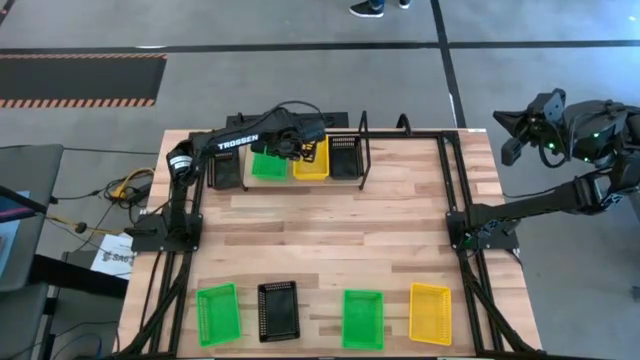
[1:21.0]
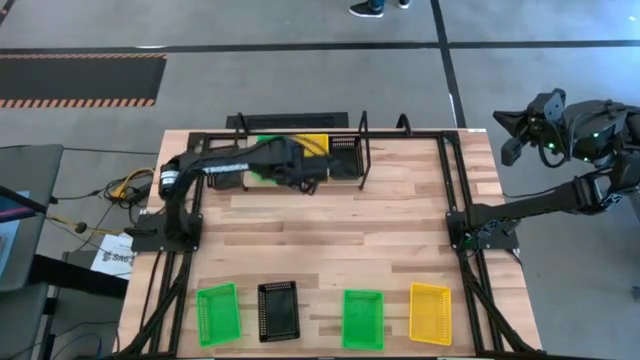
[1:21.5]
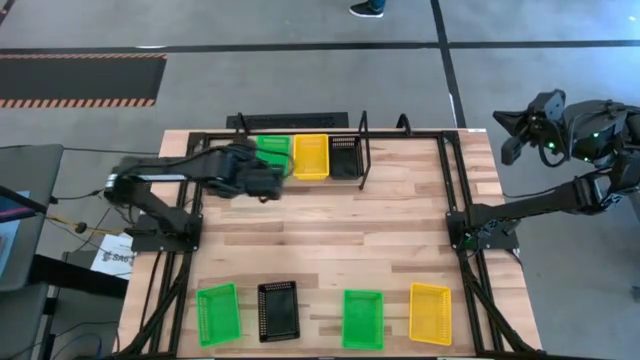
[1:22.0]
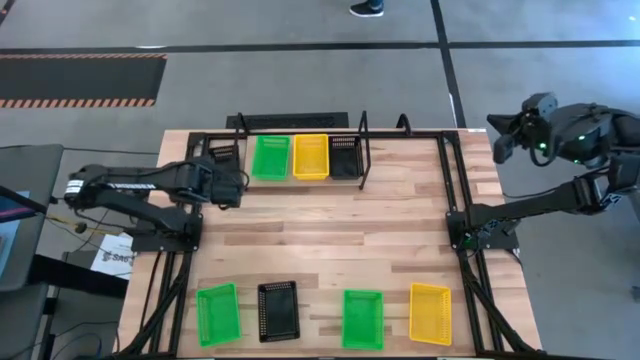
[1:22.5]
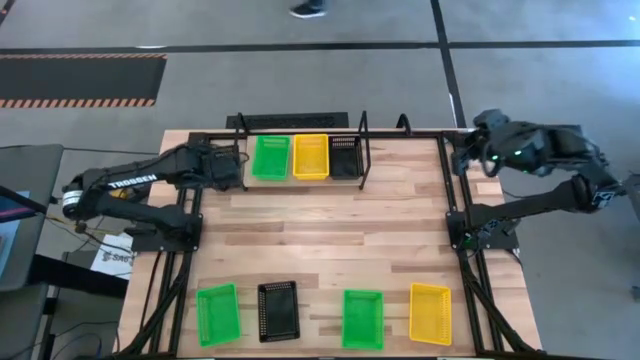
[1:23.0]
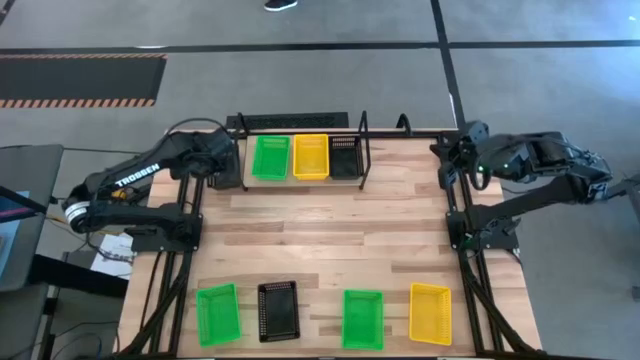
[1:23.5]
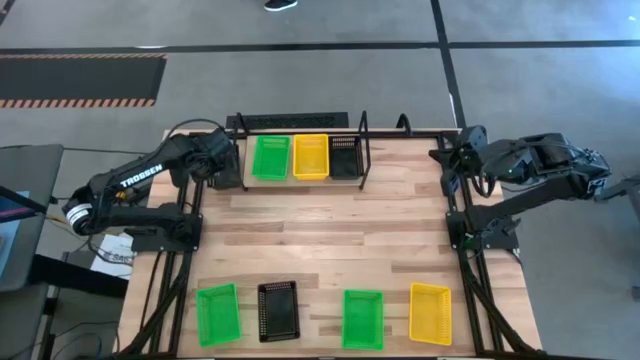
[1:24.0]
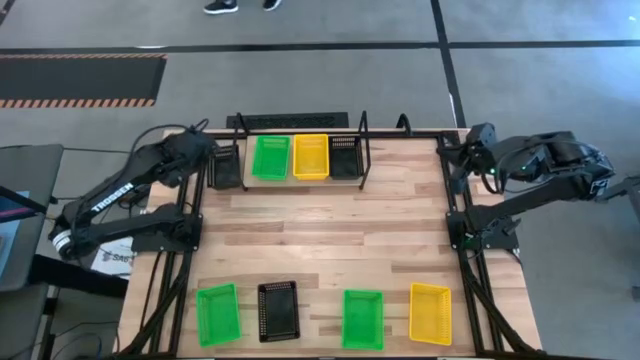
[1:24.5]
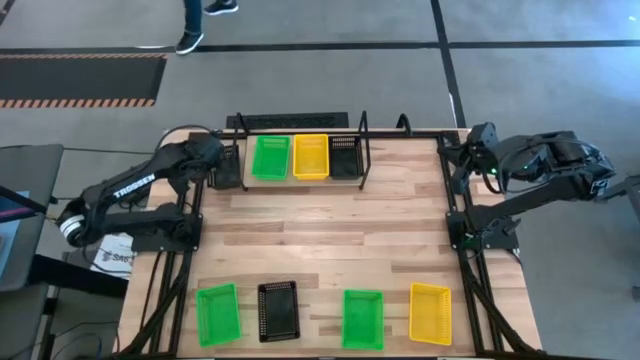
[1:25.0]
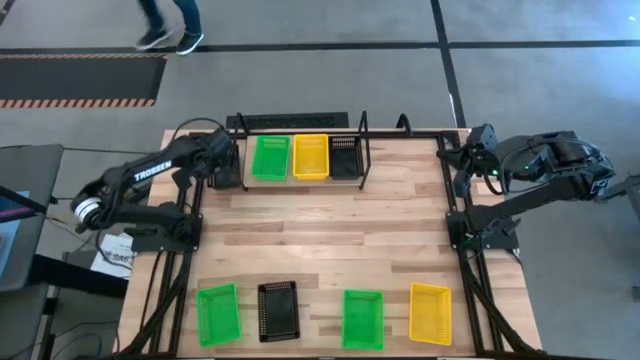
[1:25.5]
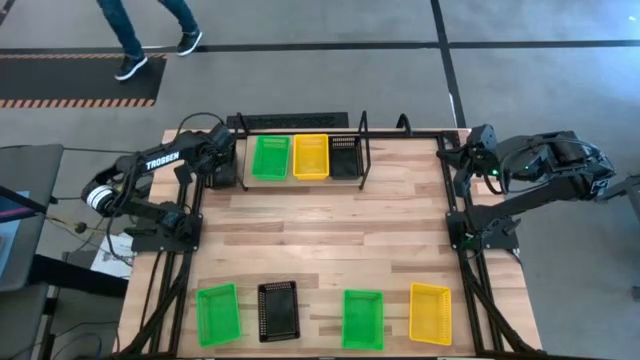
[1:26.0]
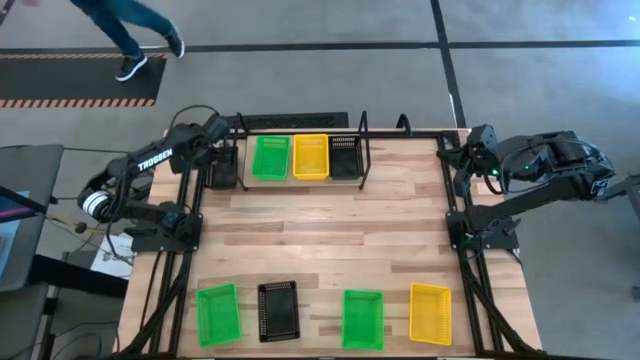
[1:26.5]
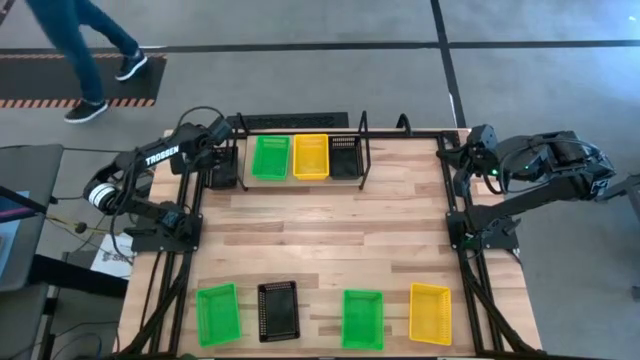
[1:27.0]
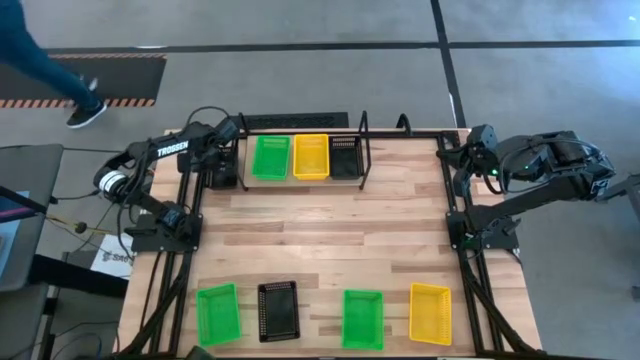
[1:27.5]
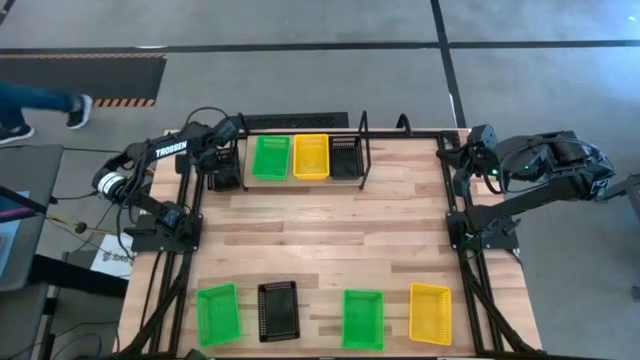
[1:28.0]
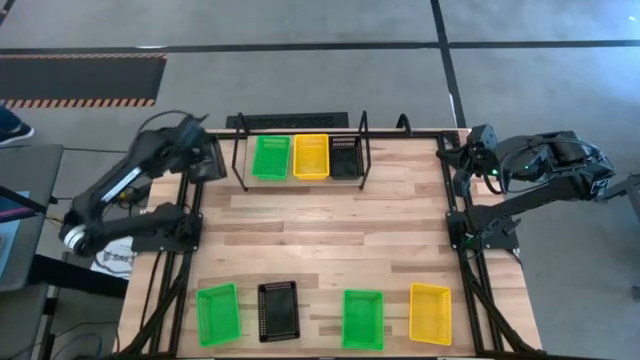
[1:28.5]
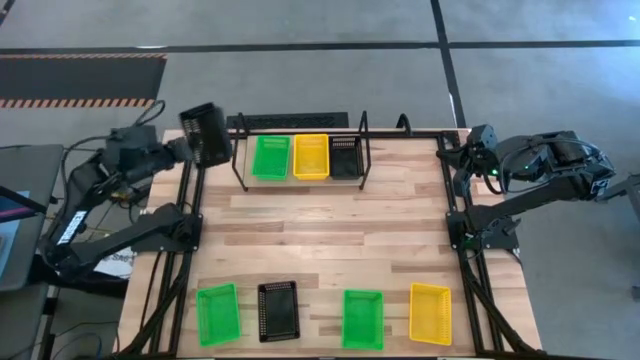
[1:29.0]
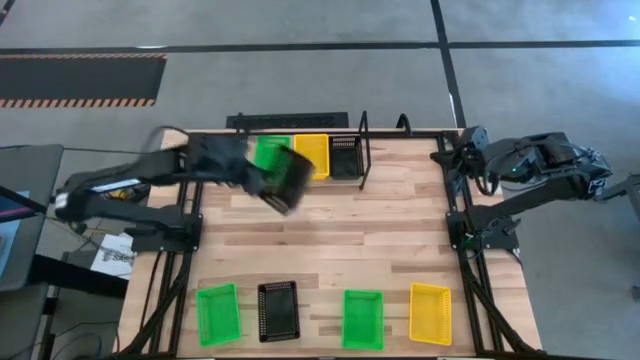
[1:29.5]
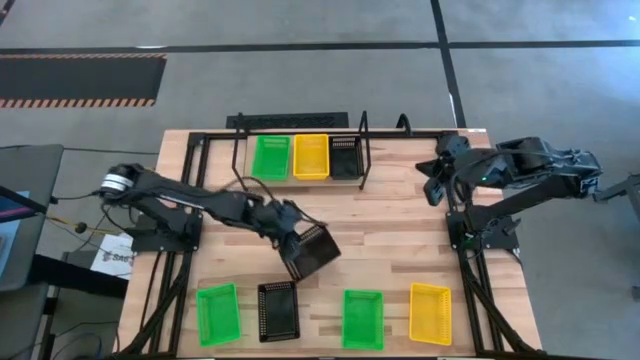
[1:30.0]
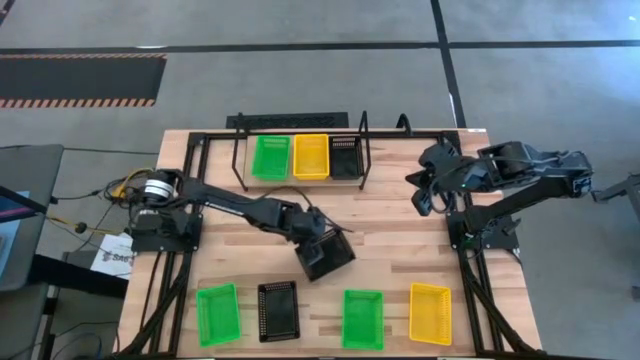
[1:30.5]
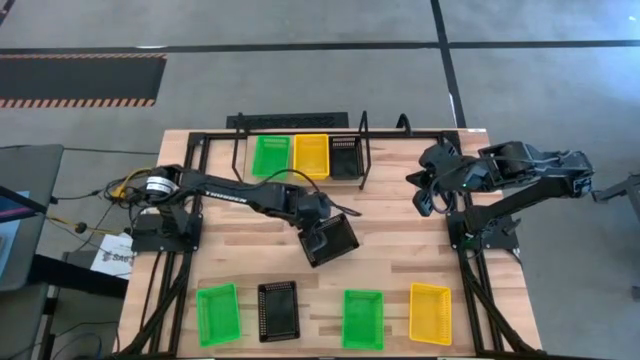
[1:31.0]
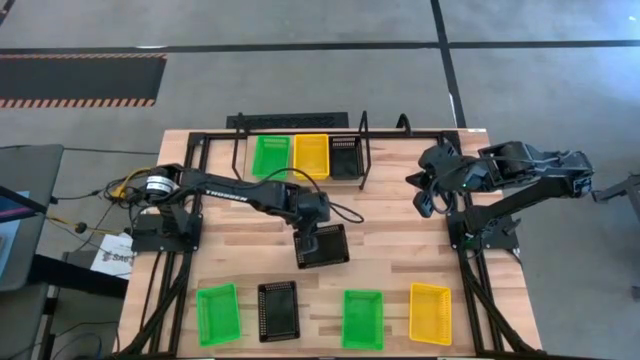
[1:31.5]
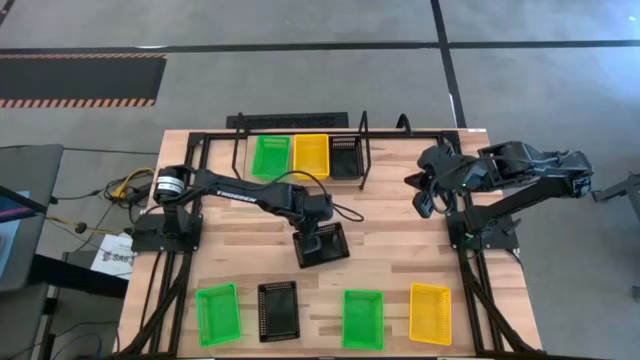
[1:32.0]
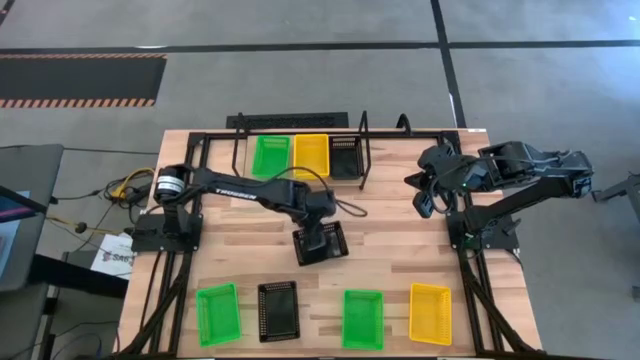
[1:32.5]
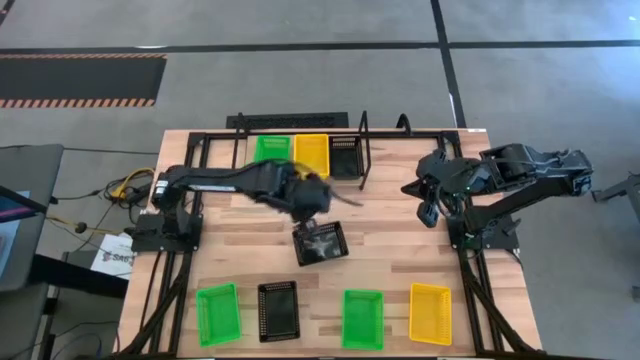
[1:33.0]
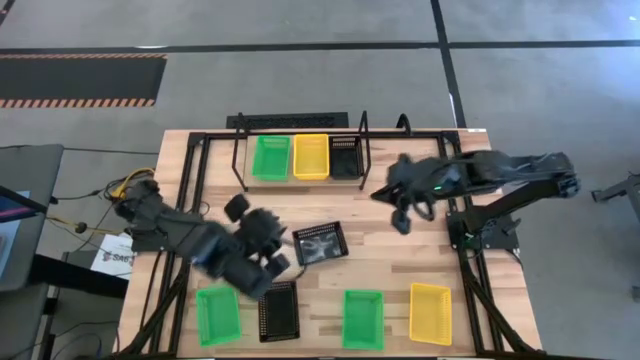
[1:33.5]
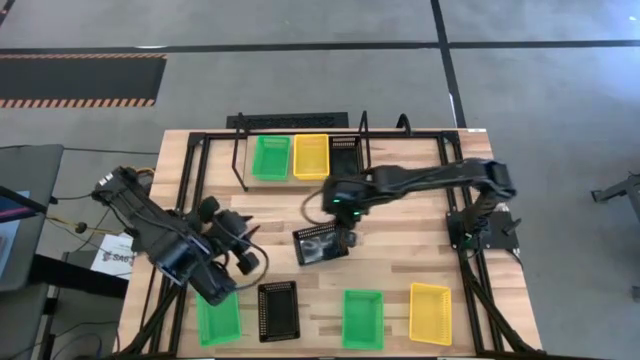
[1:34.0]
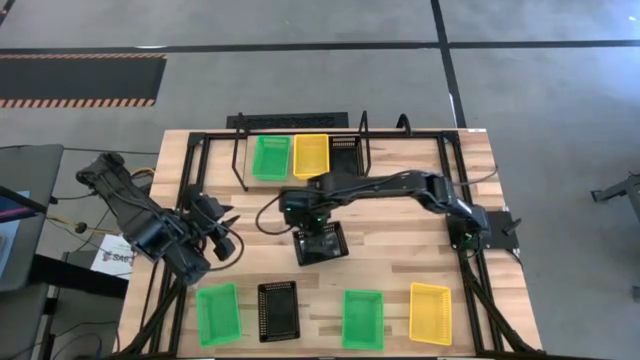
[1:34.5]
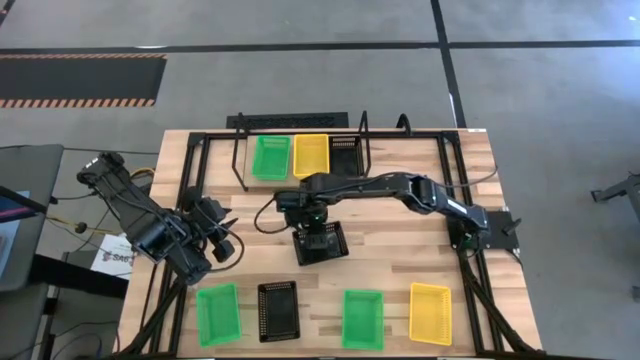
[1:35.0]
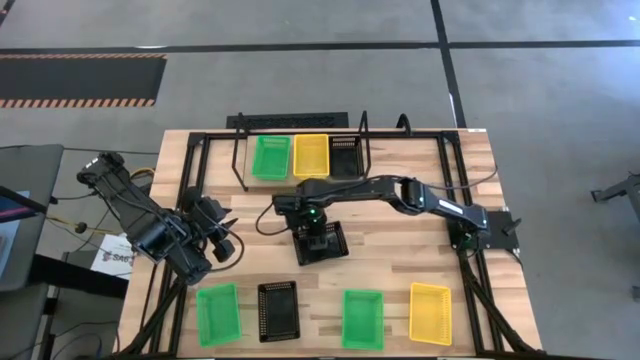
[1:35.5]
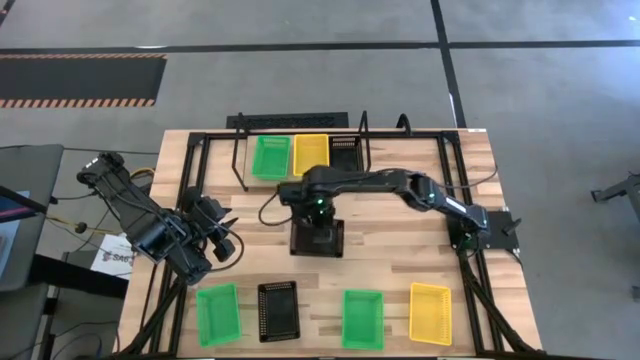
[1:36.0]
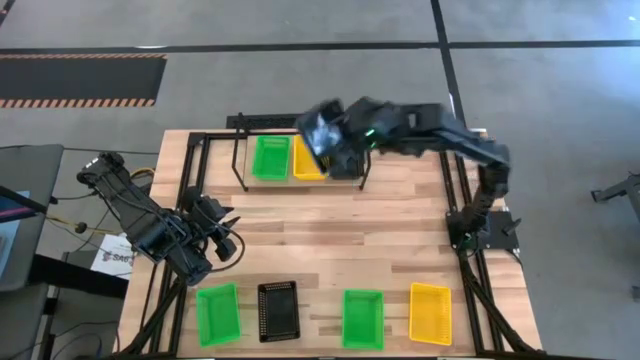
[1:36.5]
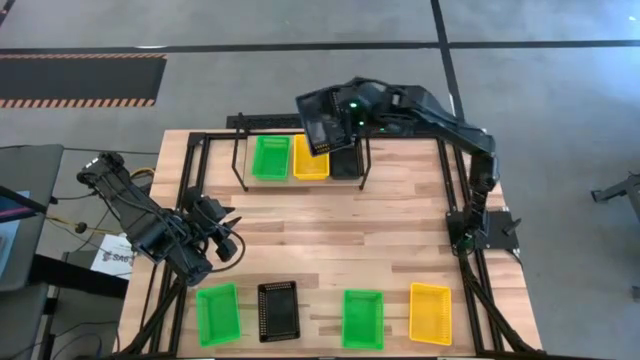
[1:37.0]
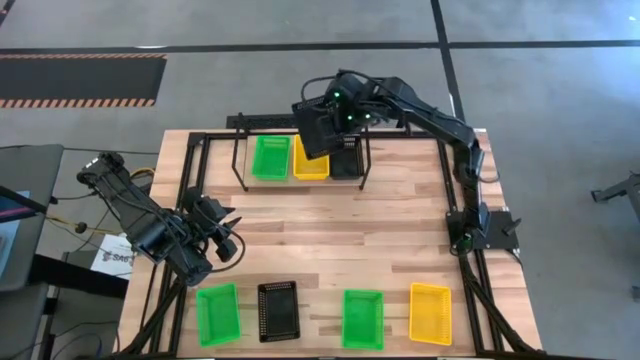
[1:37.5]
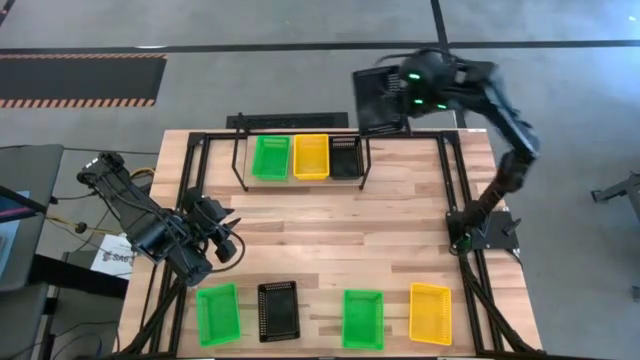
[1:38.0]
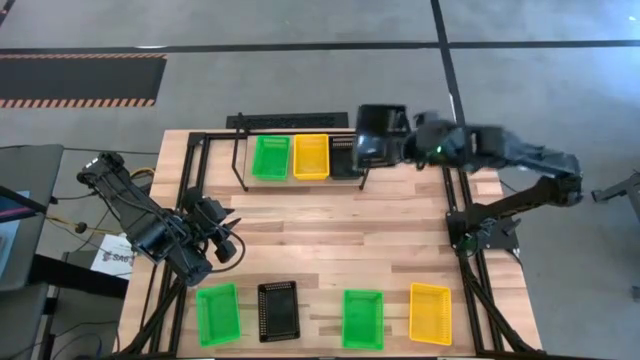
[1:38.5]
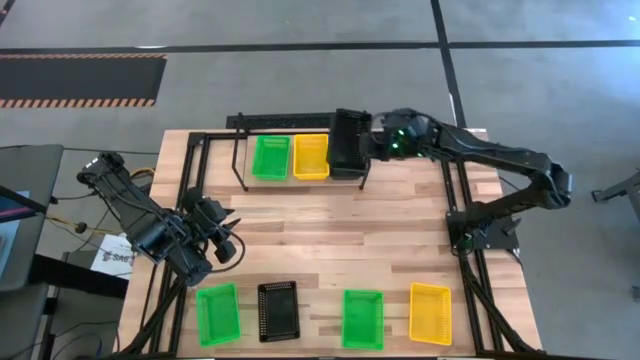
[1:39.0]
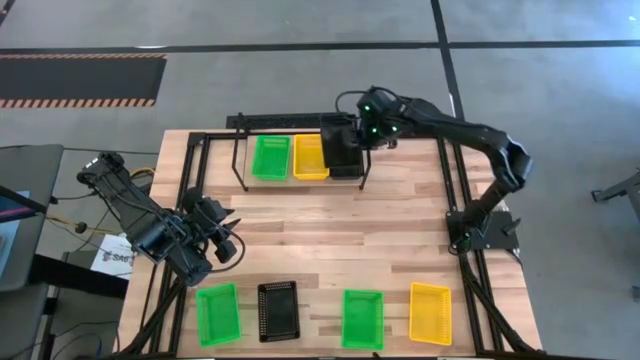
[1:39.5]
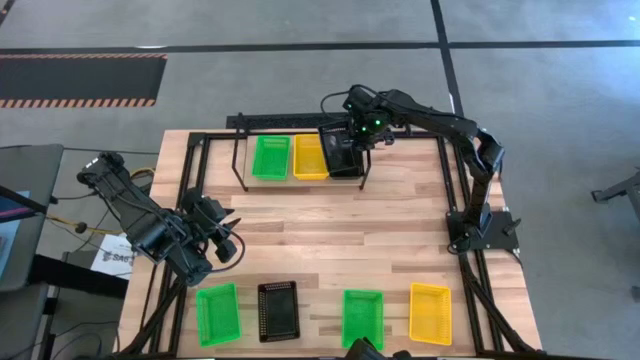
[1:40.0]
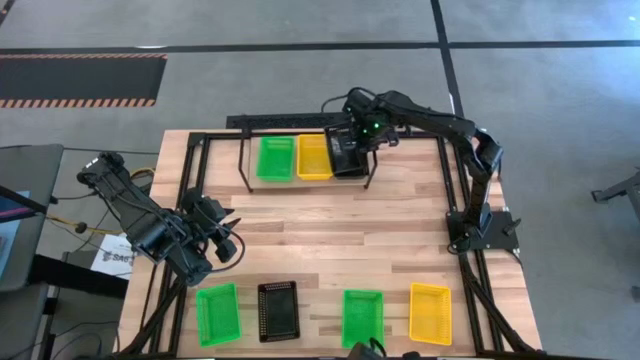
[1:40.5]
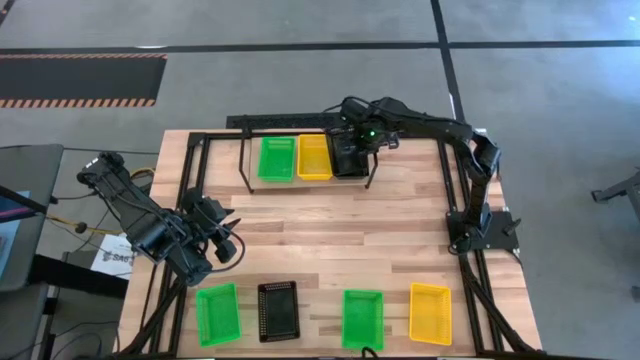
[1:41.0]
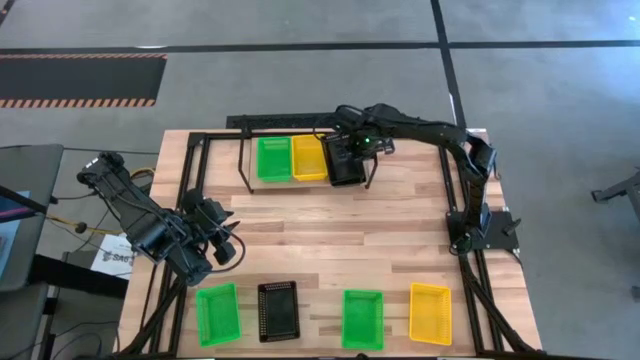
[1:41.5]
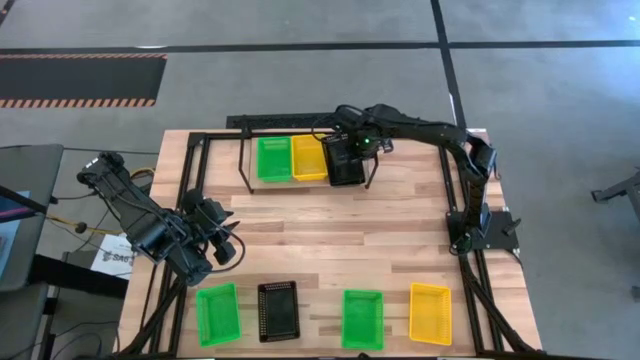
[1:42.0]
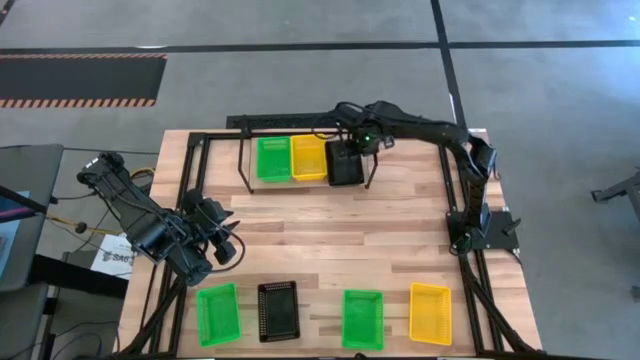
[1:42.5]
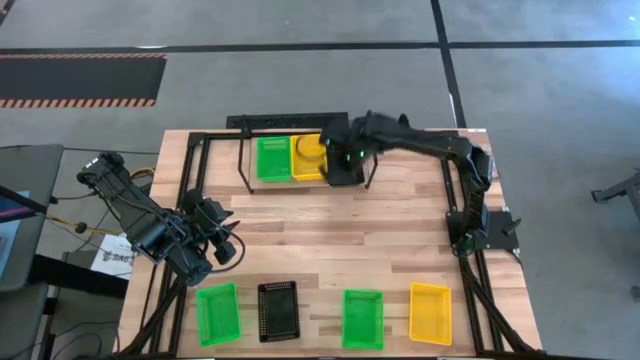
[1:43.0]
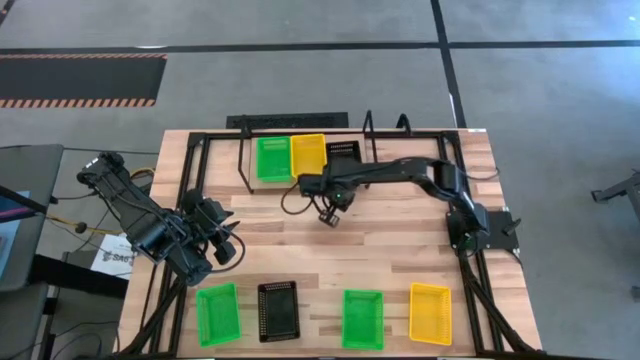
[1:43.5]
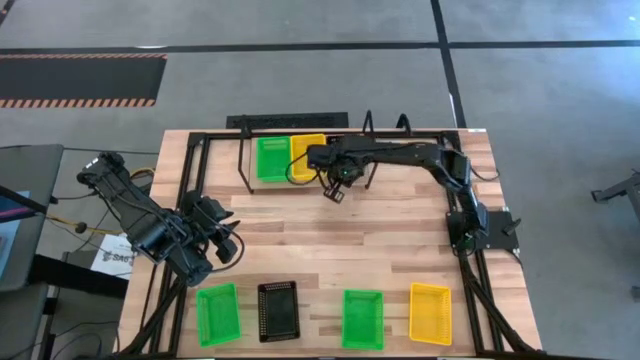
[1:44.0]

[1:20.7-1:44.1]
Task: Stack baskets on shelf by color
Stack the top black bin on top of the black bin on the shelf
